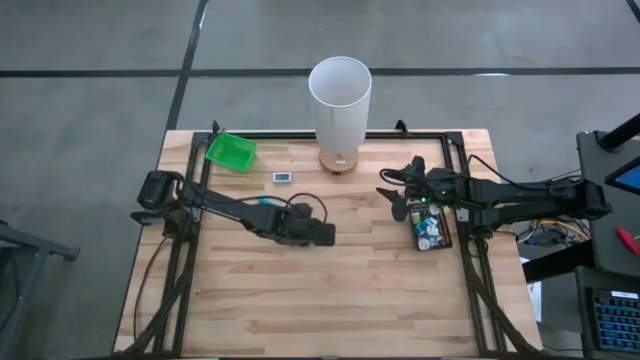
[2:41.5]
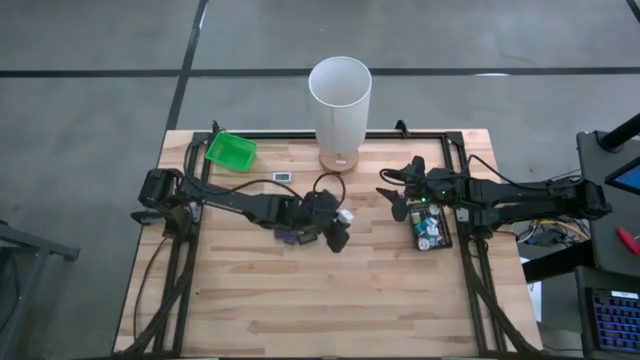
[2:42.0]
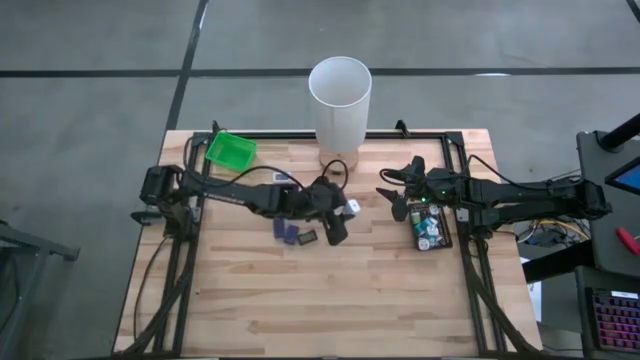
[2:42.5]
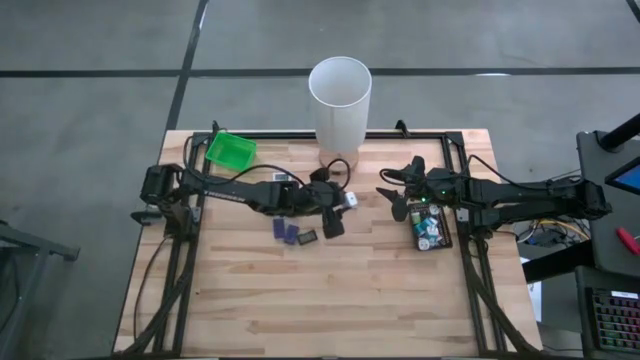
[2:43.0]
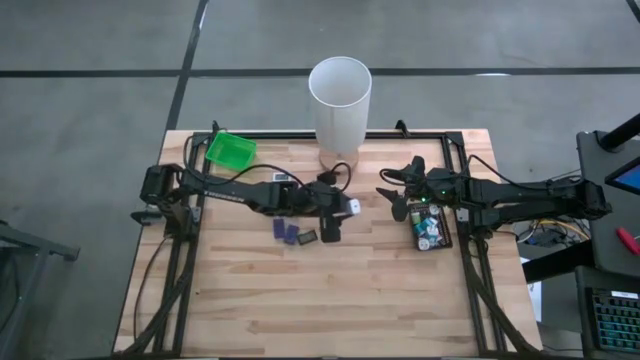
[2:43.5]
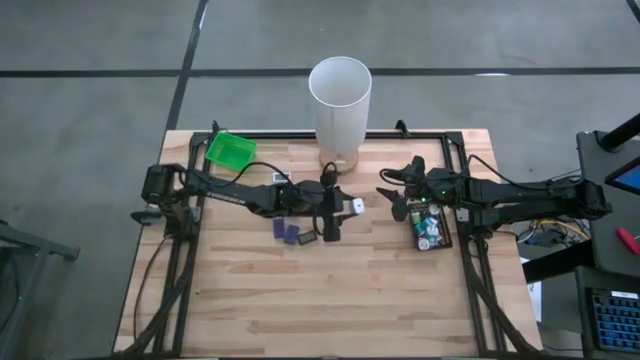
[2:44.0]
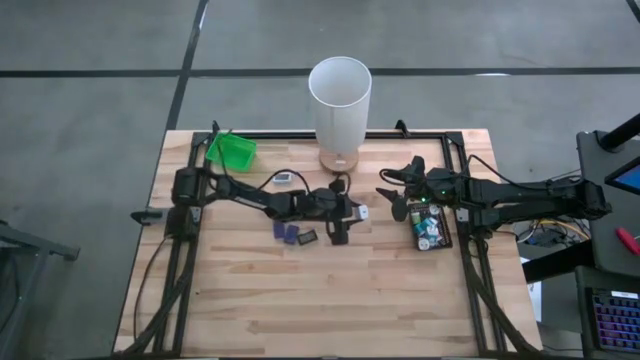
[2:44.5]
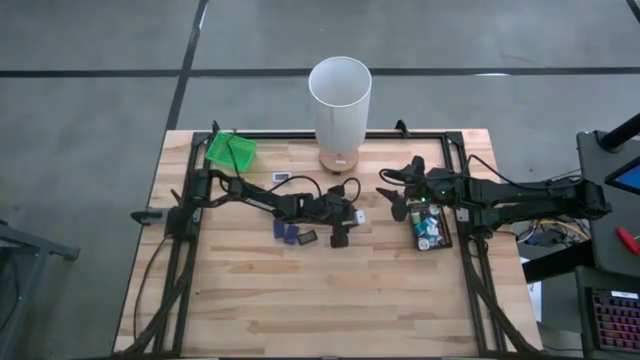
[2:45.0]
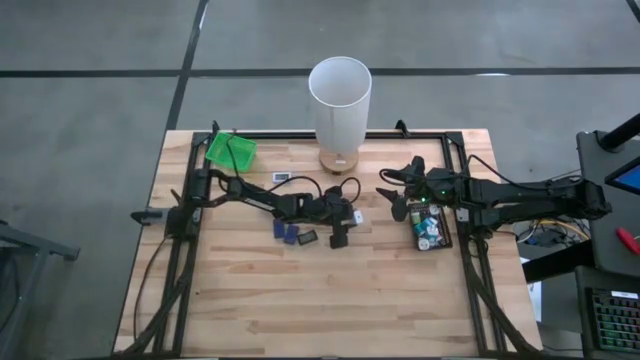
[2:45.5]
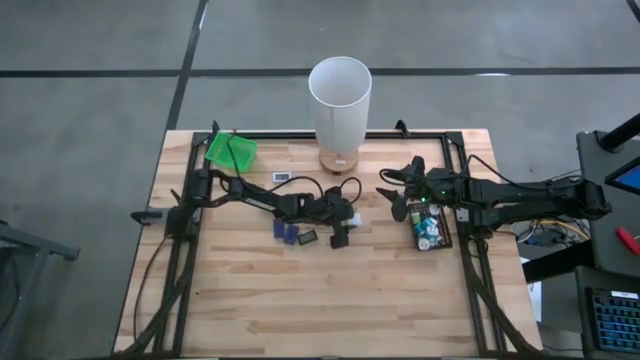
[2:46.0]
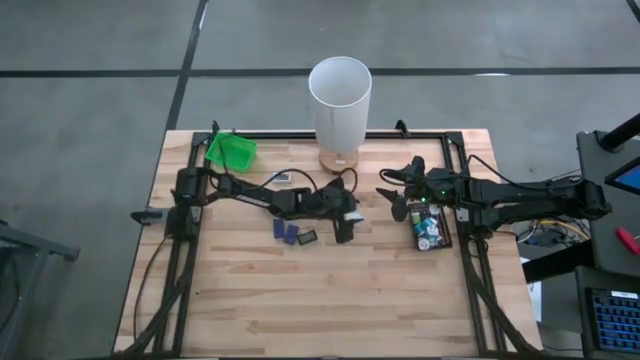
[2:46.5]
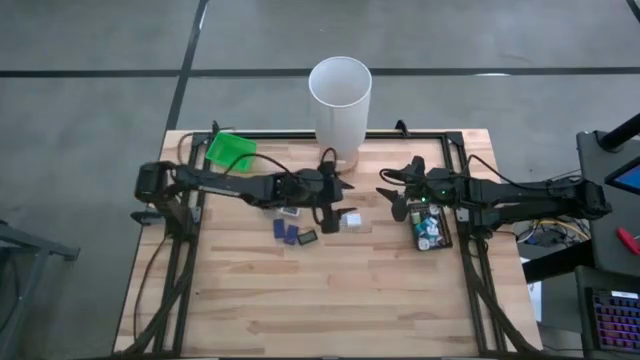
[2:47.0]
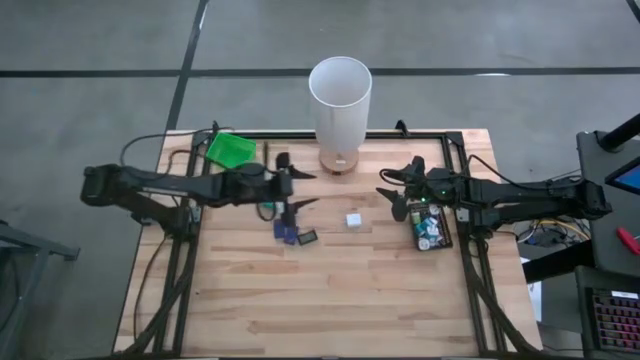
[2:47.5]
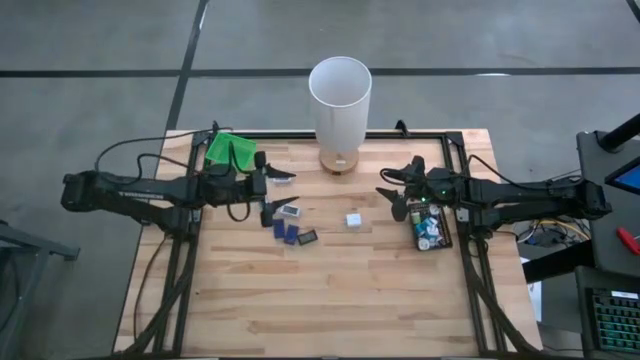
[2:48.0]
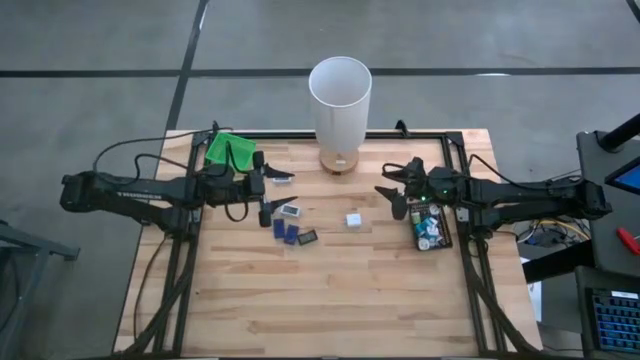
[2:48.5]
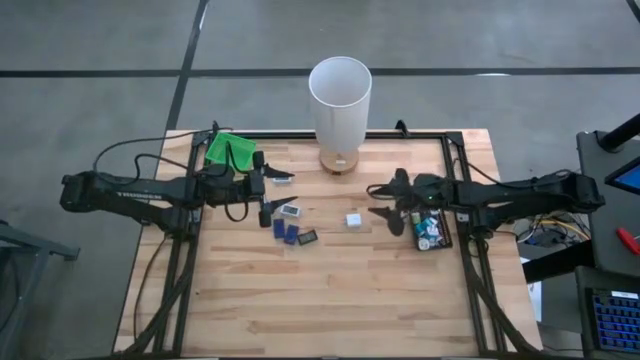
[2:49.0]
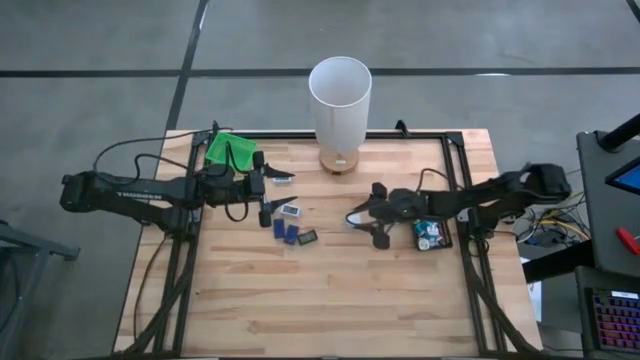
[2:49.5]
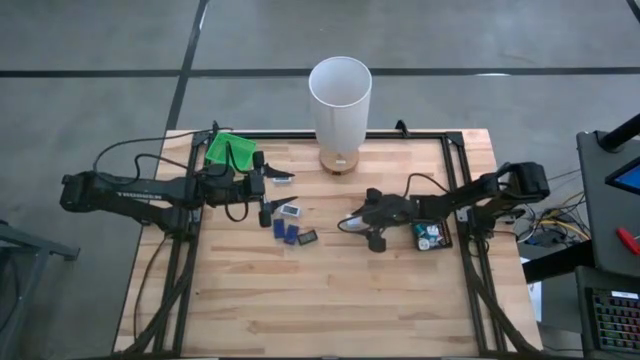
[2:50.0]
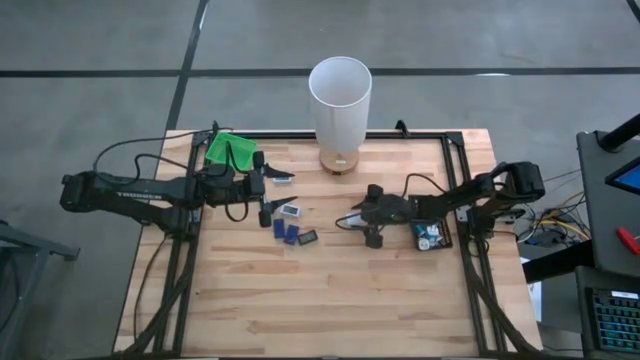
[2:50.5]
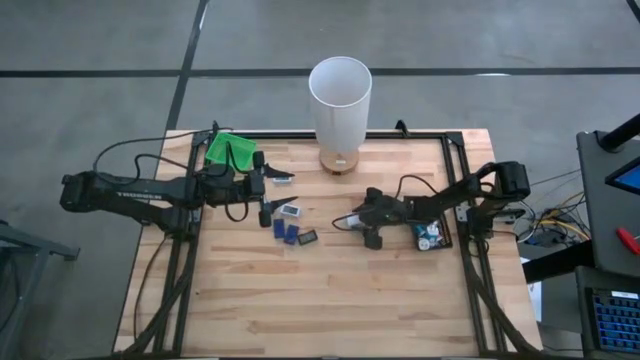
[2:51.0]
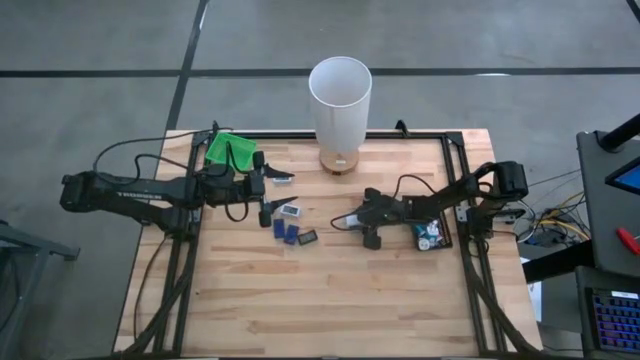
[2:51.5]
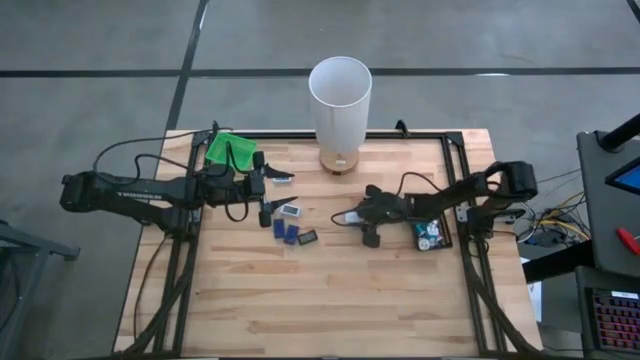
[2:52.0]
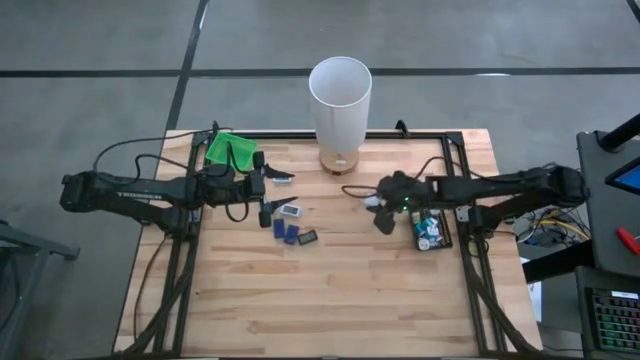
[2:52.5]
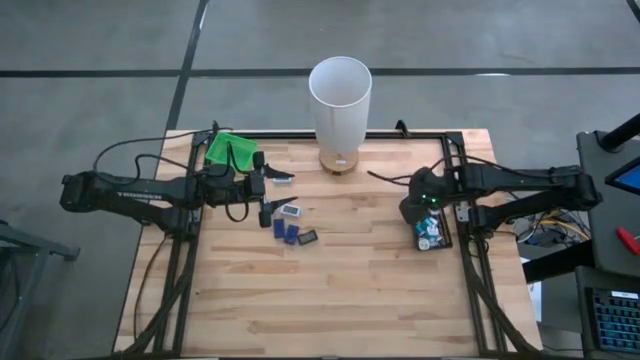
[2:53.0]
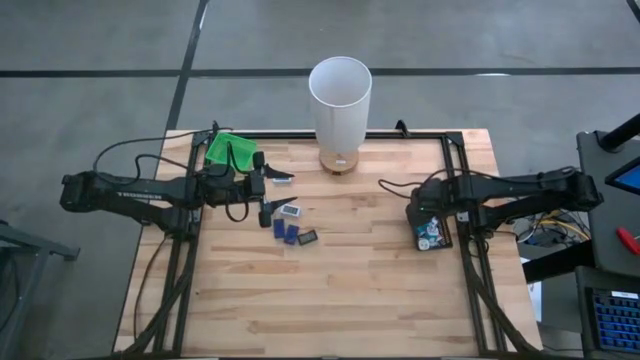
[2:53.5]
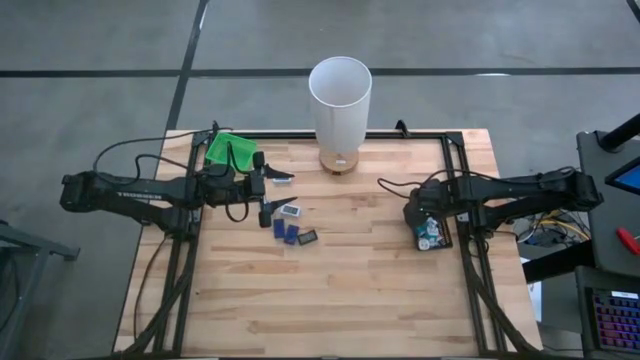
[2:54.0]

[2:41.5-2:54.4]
Task: Pick & Place Office items
Put the white charger adapter into the black bin

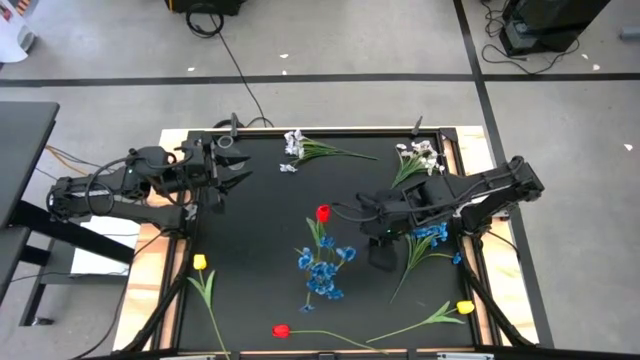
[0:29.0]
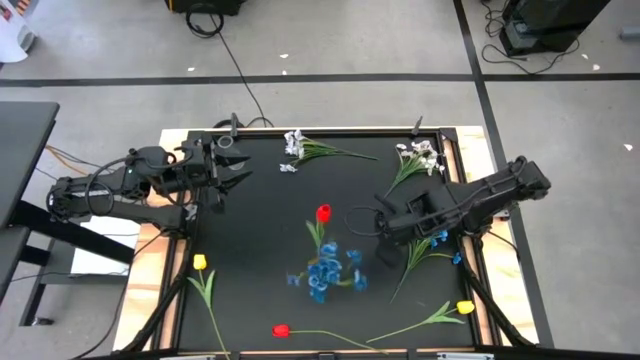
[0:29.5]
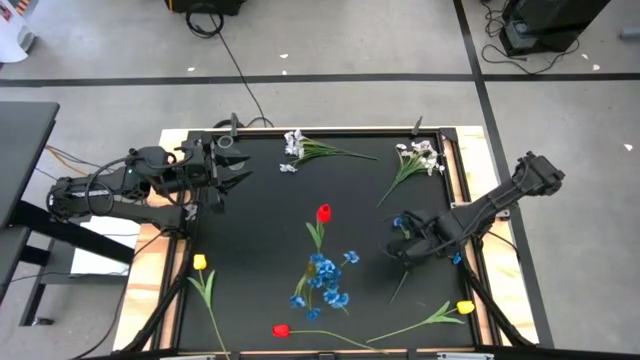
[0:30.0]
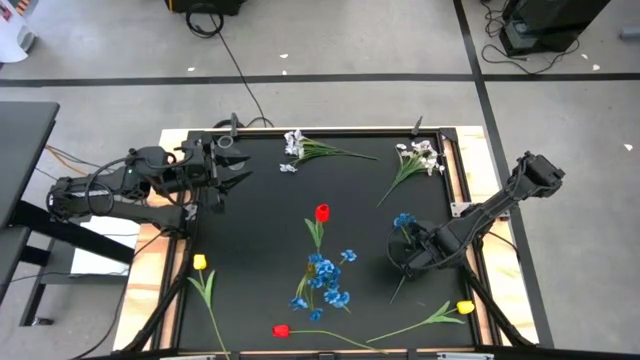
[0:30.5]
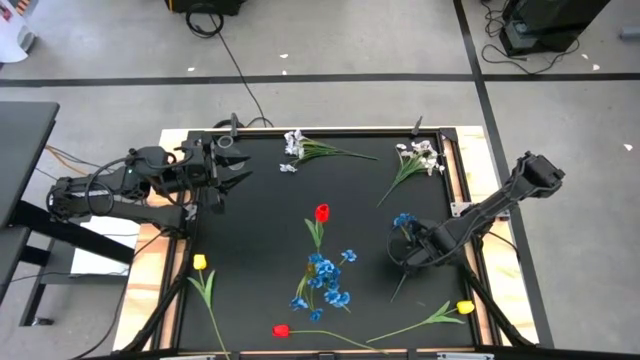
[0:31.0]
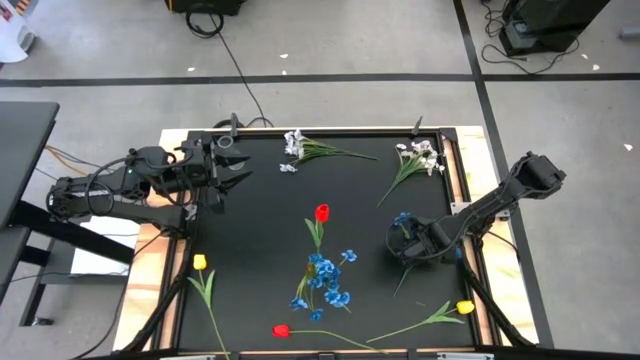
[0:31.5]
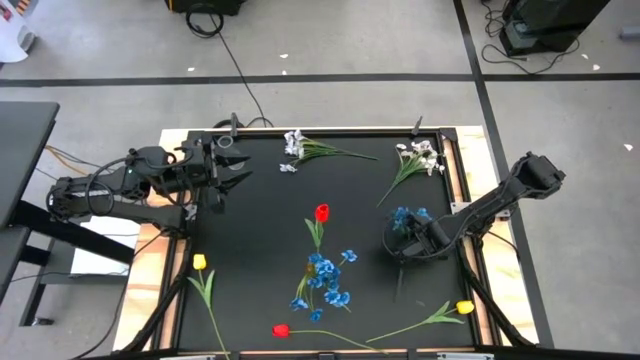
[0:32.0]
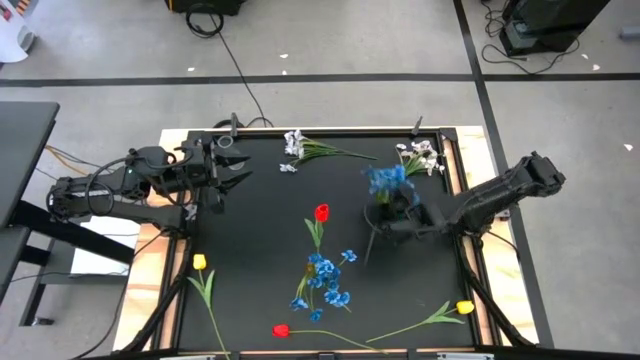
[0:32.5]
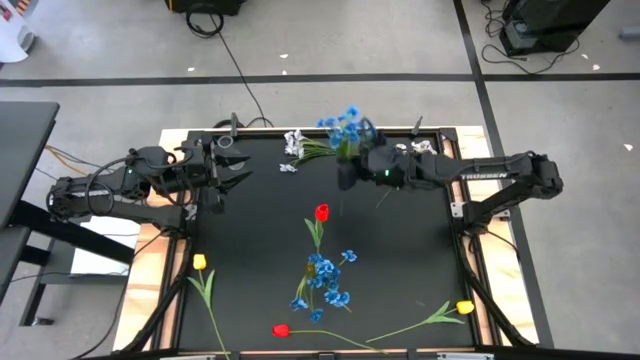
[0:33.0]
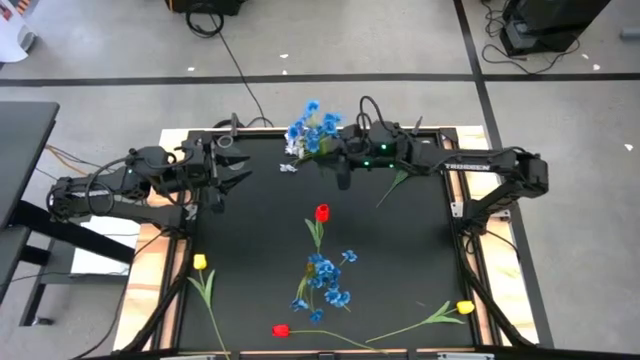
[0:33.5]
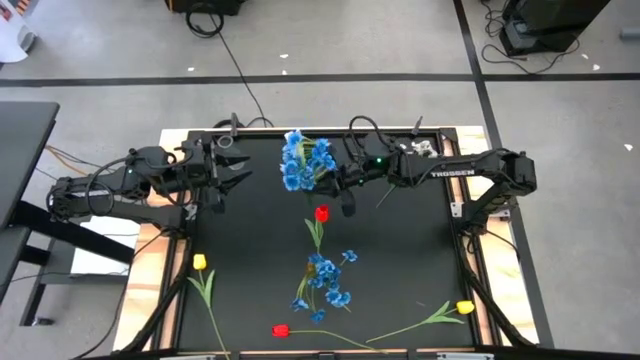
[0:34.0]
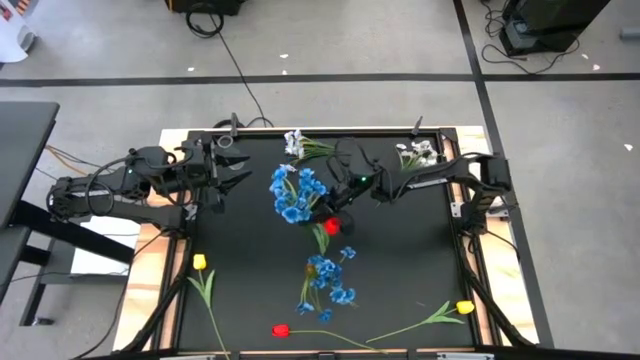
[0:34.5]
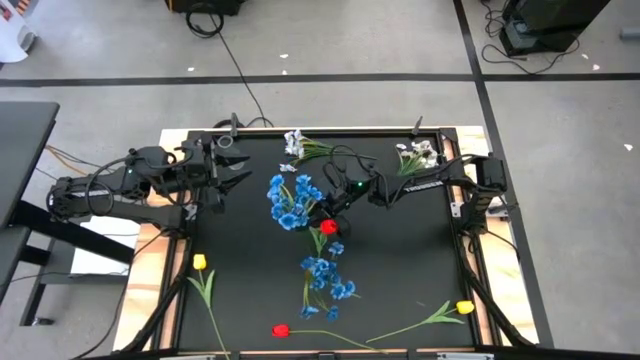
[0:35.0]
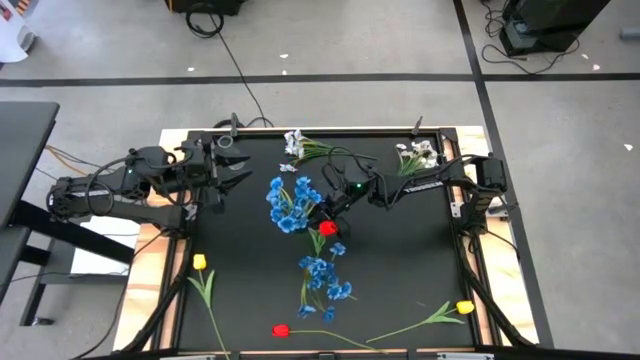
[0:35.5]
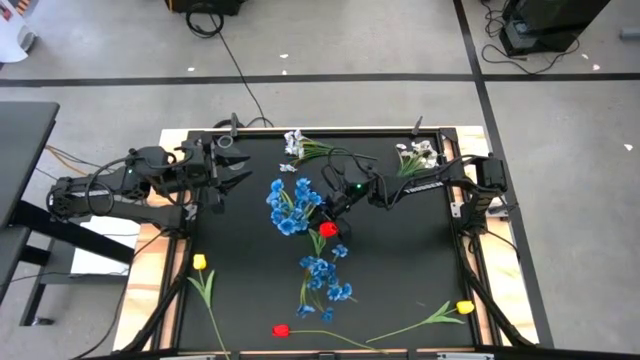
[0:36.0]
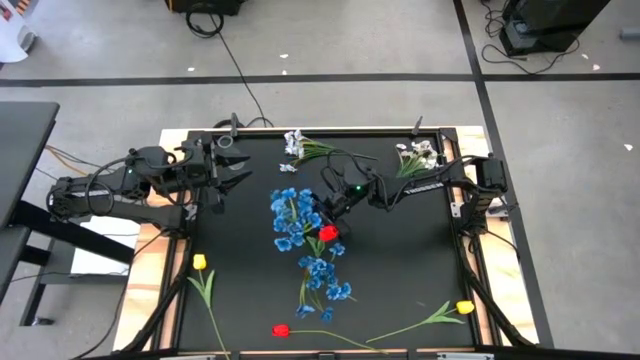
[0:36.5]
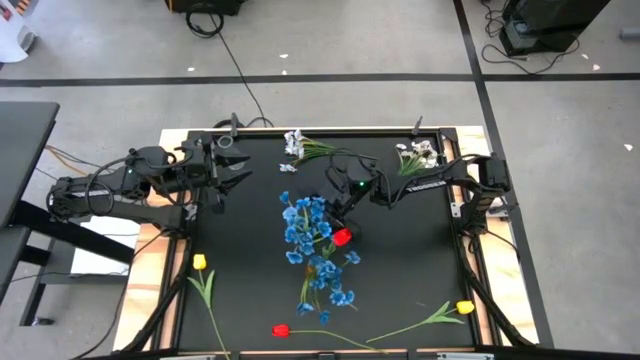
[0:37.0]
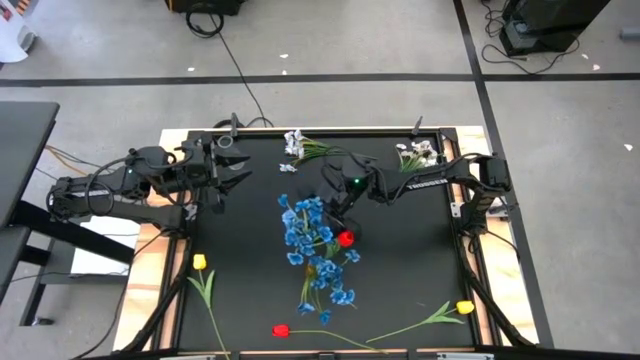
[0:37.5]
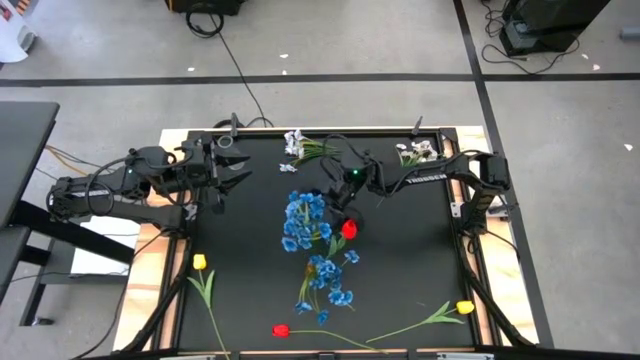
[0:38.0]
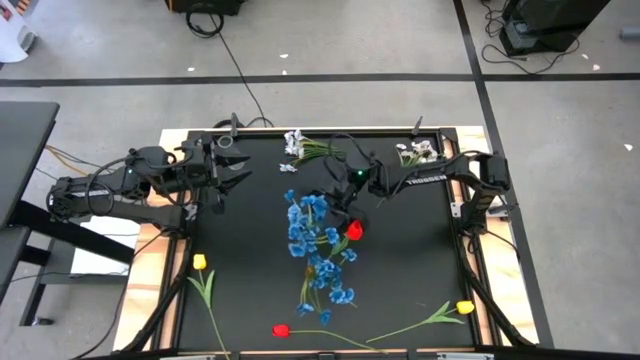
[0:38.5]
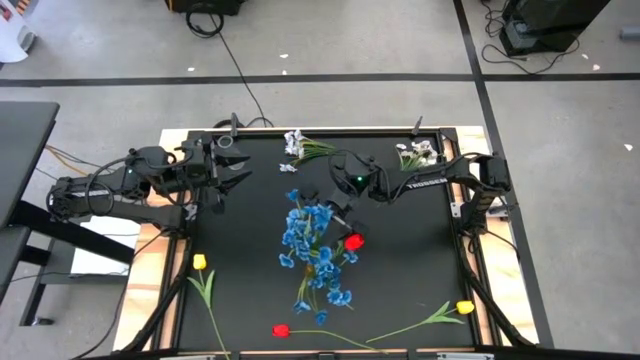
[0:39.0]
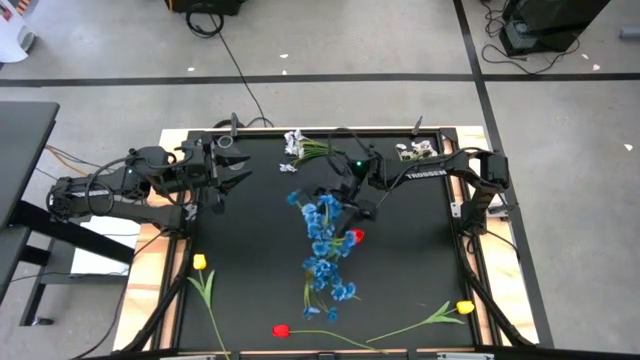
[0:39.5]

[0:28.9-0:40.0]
Task: Sort flowers into vase by color
Put the blue flowers into the yellow vase
